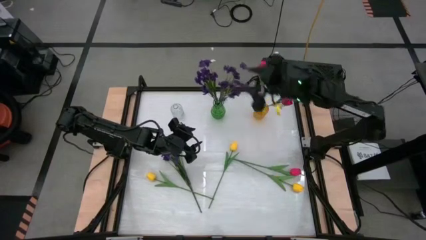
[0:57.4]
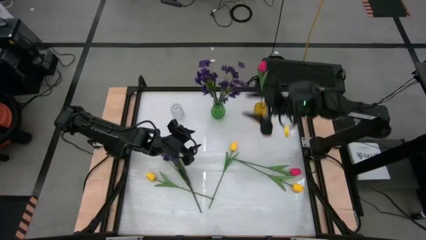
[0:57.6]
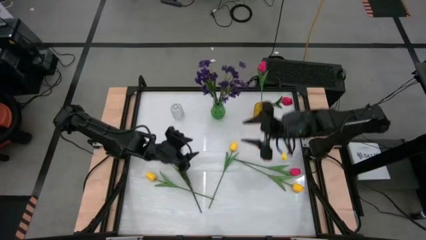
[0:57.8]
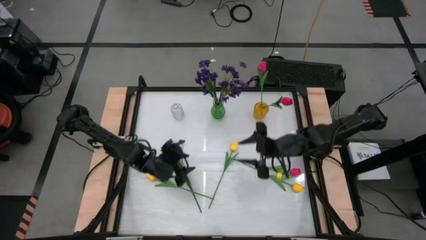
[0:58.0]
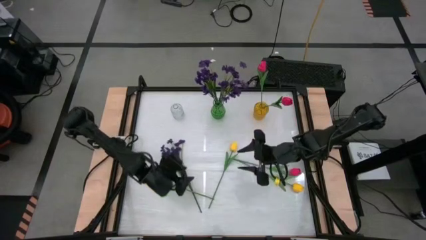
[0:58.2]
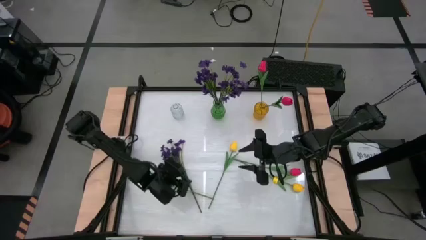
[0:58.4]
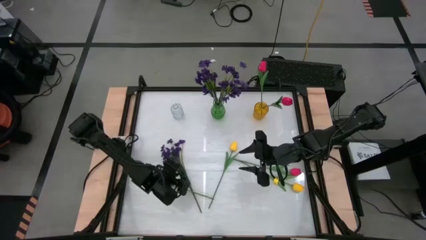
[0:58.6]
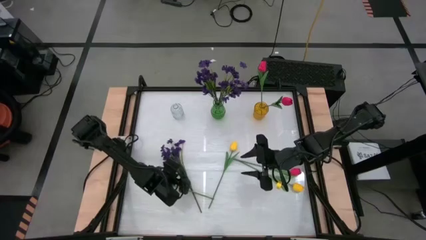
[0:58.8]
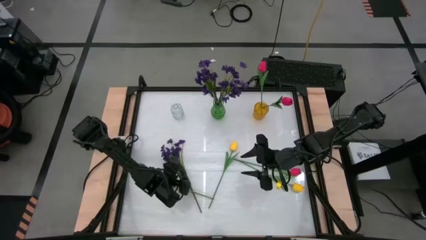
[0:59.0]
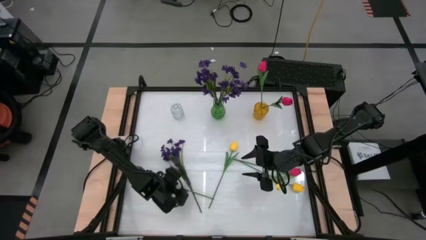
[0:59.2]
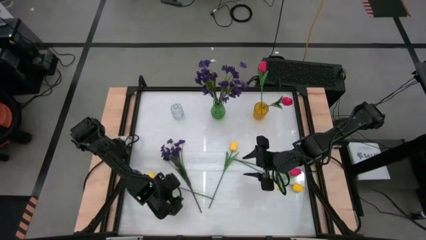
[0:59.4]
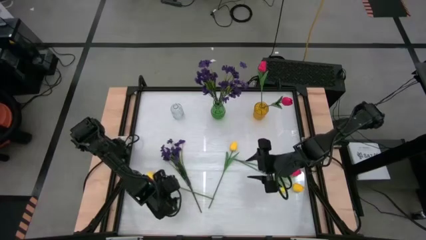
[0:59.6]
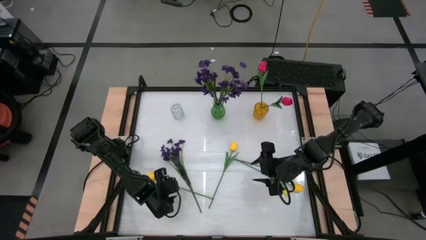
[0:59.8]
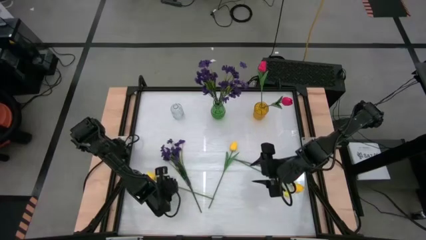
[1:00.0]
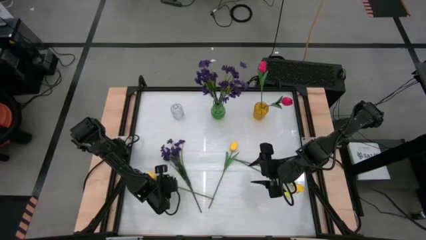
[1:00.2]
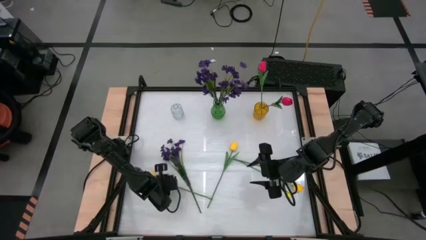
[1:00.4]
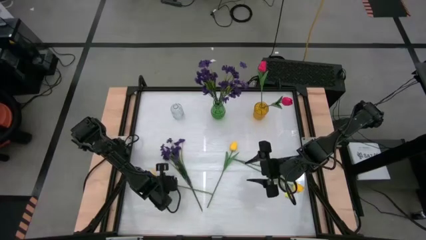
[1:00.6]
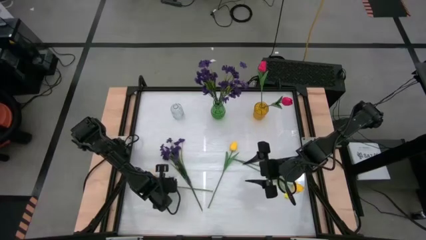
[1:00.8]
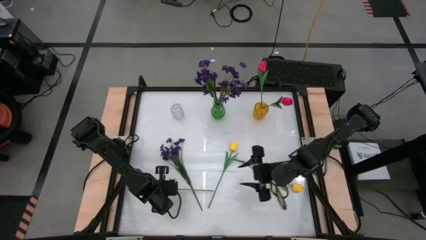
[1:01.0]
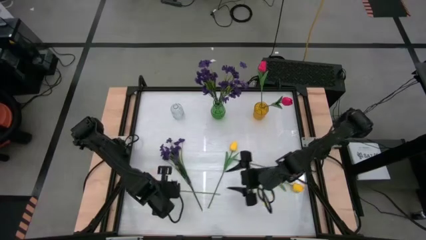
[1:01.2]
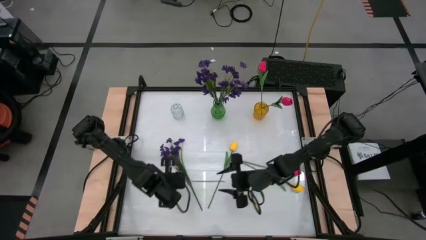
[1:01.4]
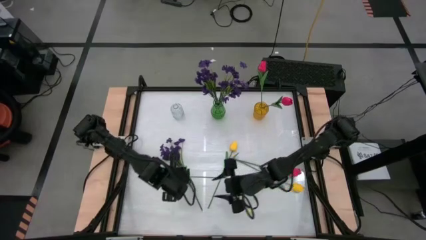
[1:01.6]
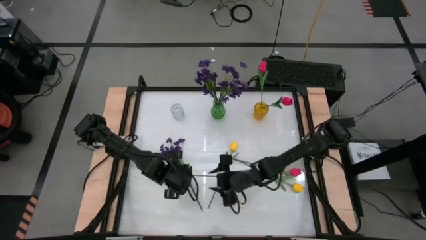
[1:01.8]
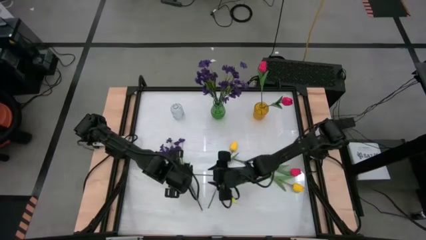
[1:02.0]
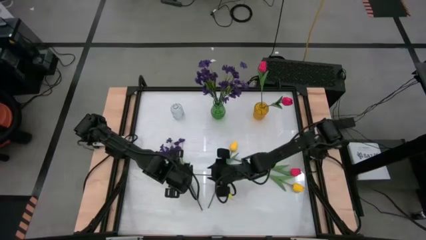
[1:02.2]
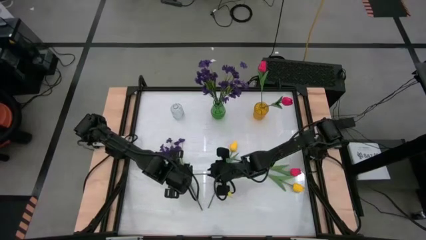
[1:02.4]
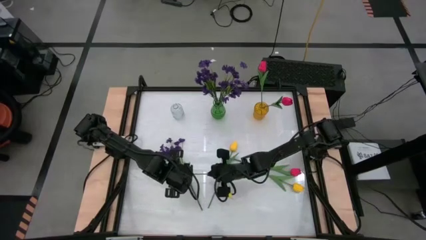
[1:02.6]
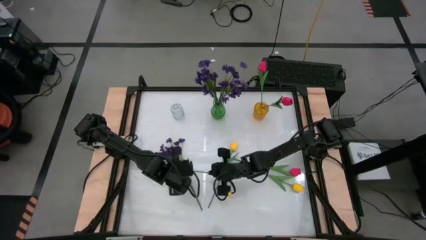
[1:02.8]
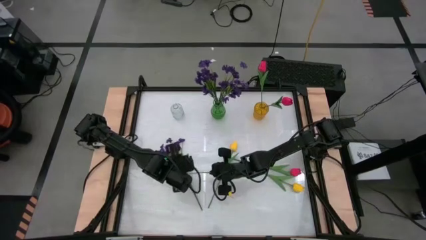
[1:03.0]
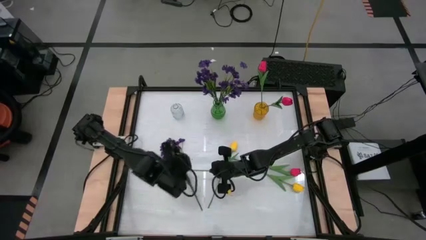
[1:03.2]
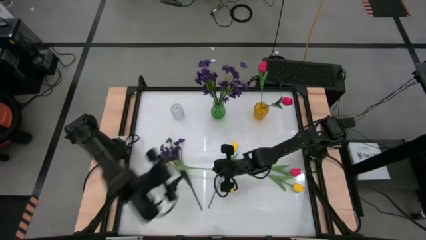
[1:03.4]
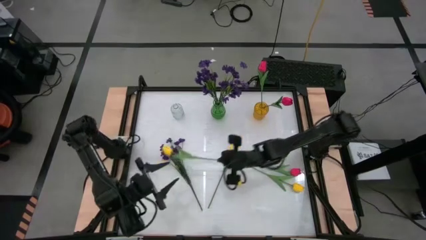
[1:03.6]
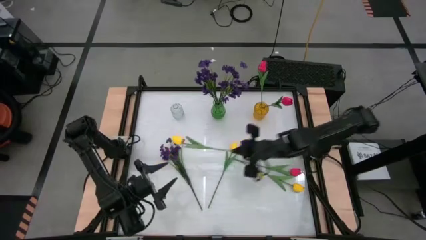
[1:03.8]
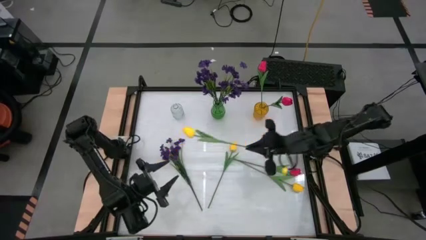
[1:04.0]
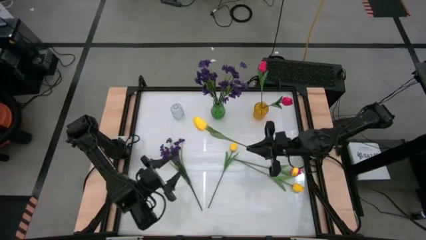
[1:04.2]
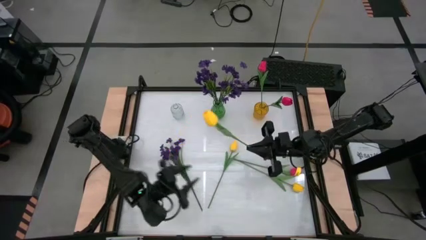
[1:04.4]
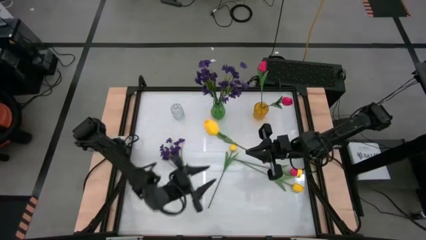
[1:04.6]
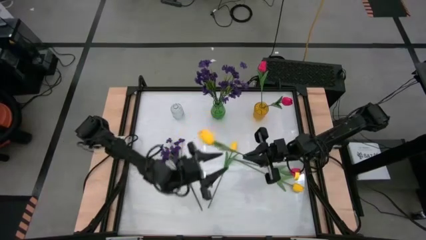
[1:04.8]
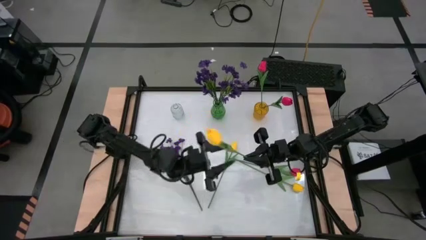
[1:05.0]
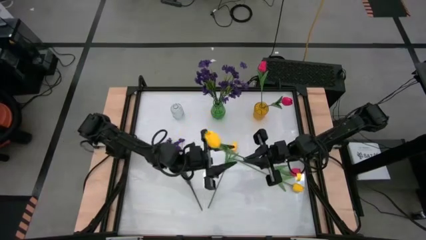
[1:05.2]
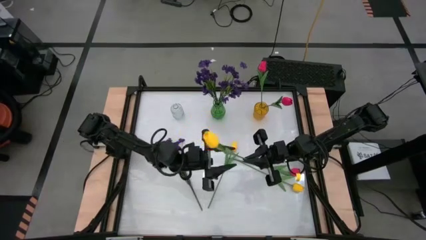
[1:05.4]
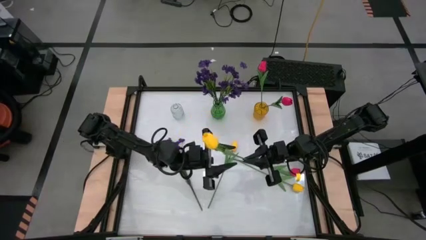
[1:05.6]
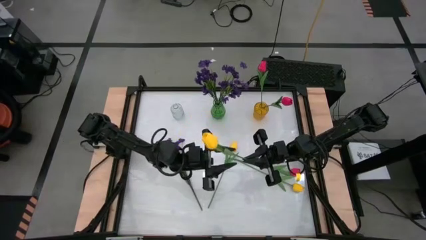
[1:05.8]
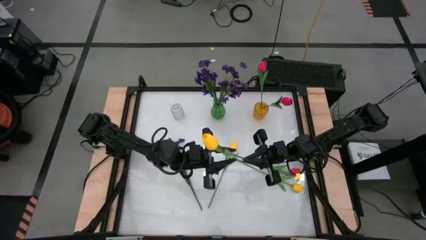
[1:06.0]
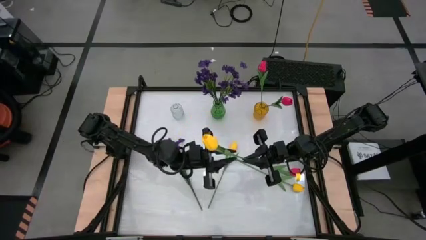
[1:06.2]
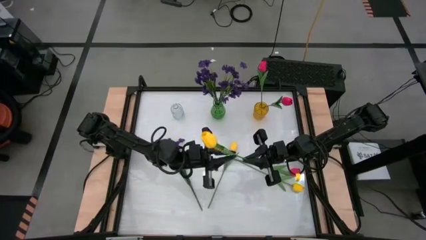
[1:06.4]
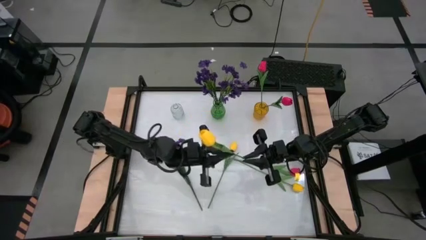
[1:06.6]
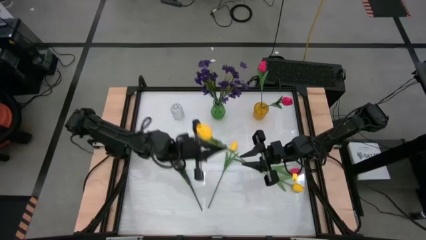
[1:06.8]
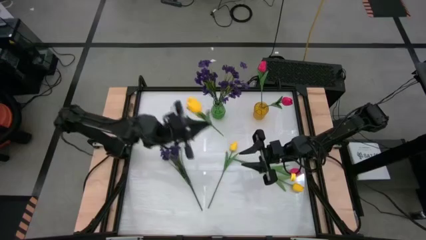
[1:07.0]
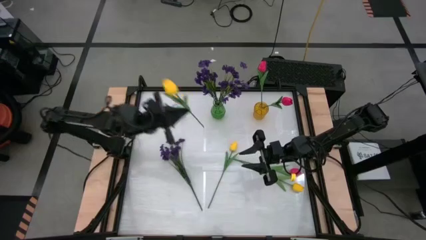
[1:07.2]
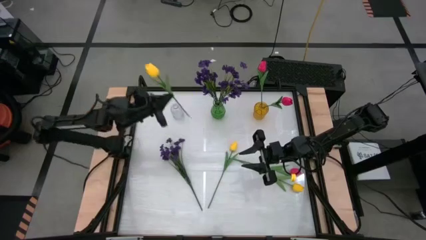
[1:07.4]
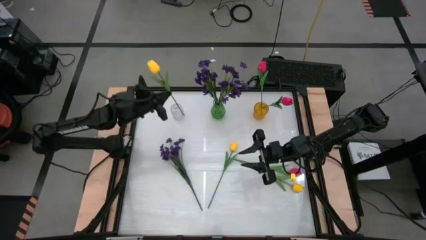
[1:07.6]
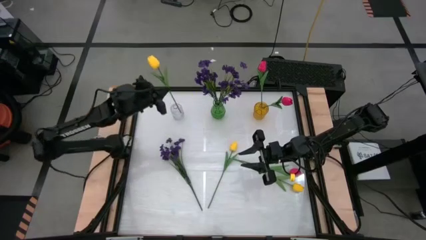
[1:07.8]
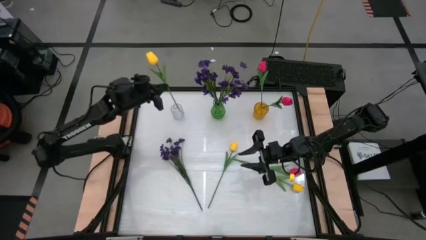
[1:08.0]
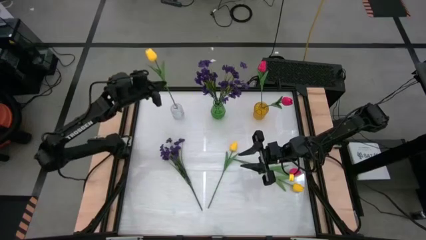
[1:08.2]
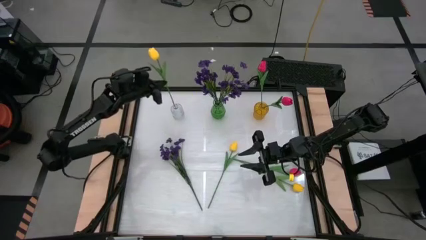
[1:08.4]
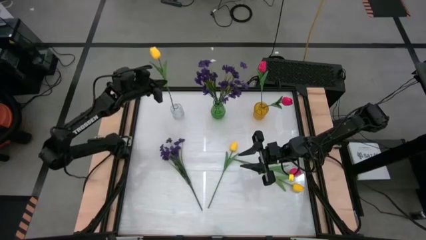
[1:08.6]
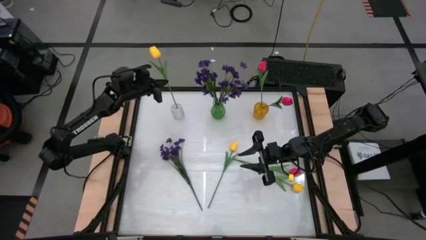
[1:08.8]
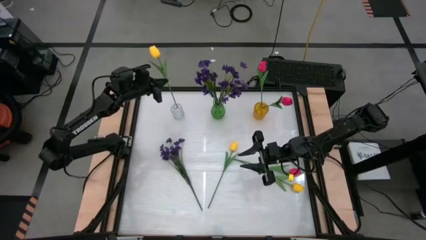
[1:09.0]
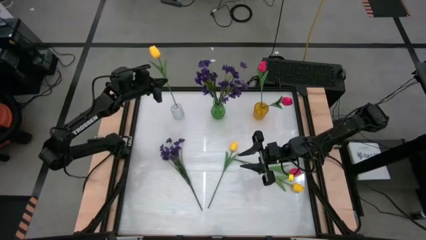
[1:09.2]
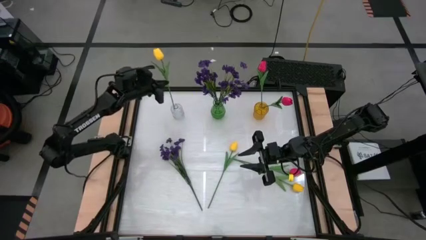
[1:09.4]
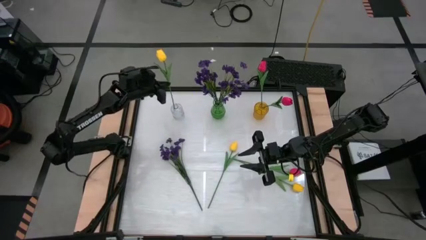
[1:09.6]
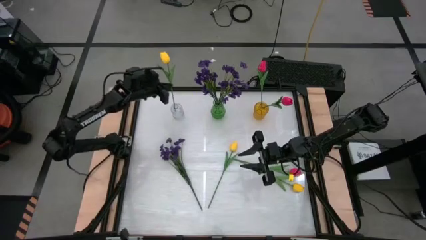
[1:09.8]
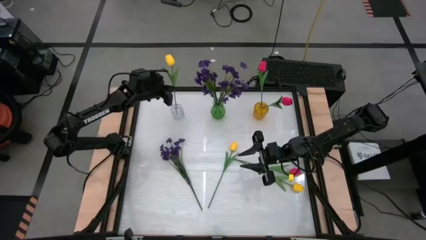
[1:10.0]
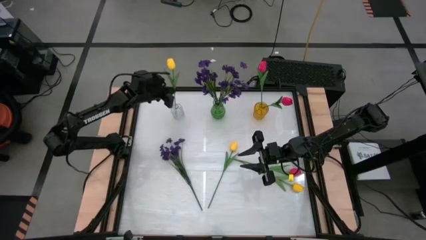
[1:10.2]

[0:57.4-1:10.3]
Task: Sort flowers into vase by color
Put the left yellow flower into the transparent vase
